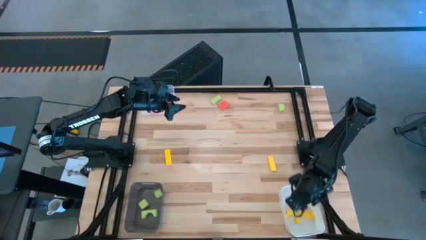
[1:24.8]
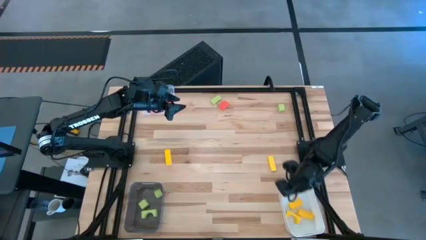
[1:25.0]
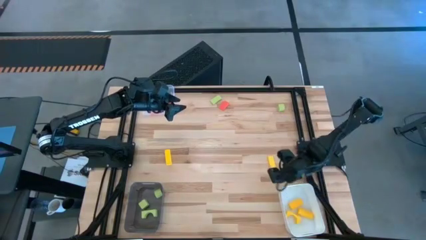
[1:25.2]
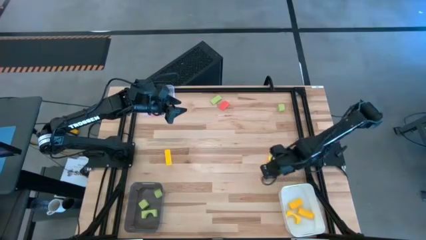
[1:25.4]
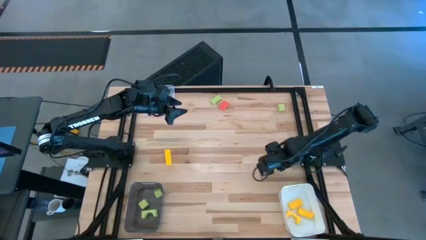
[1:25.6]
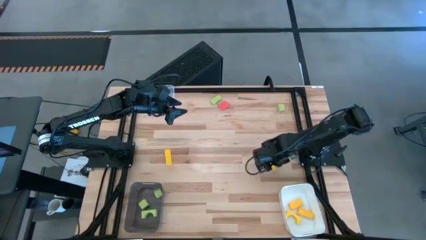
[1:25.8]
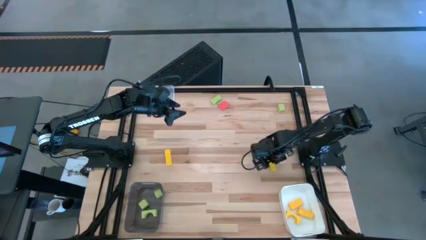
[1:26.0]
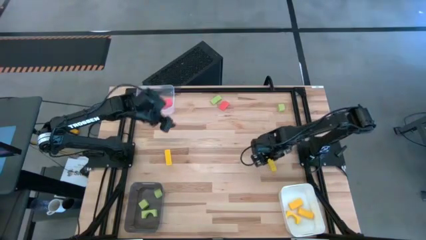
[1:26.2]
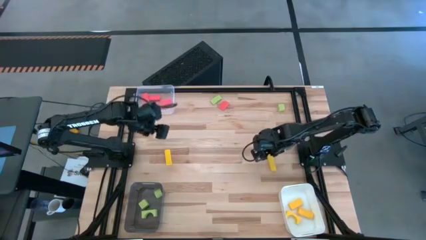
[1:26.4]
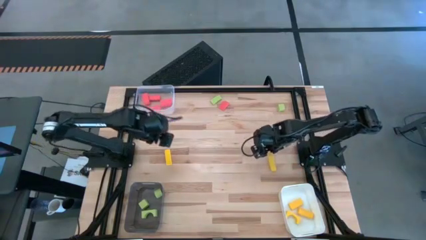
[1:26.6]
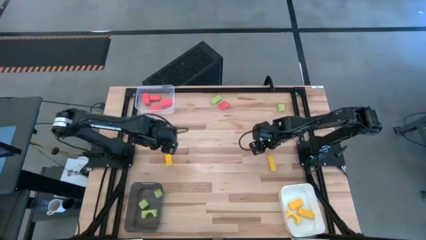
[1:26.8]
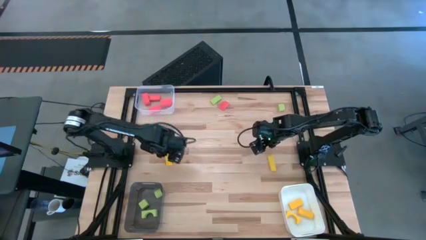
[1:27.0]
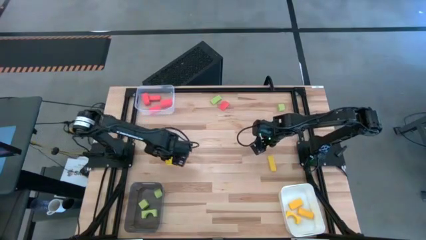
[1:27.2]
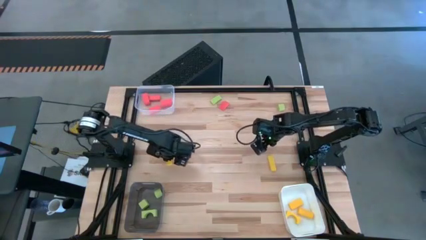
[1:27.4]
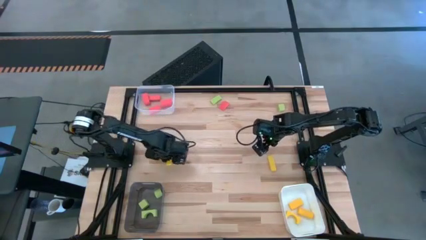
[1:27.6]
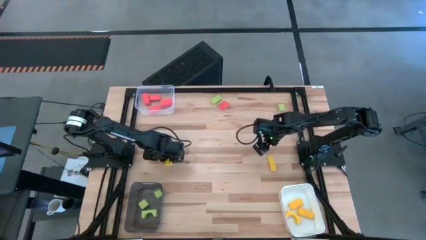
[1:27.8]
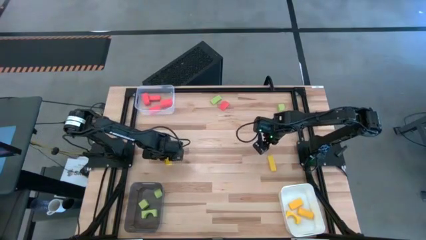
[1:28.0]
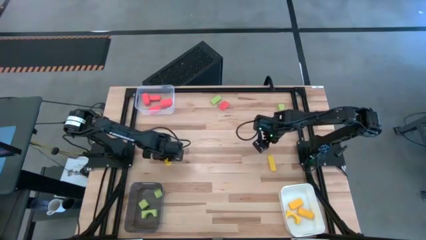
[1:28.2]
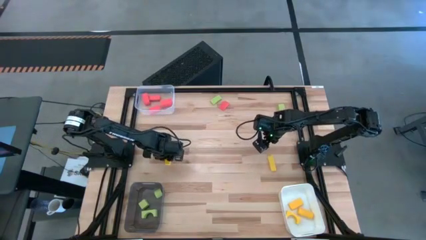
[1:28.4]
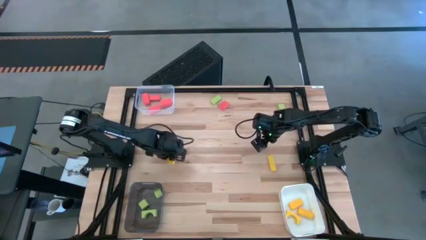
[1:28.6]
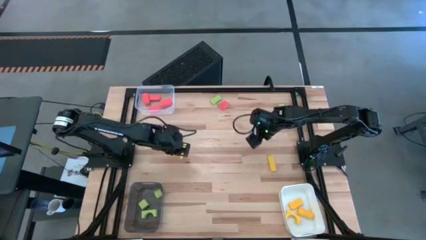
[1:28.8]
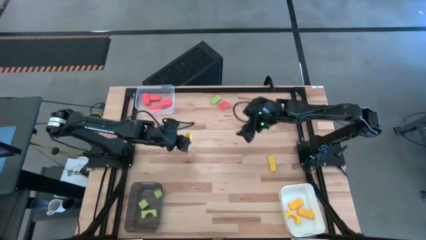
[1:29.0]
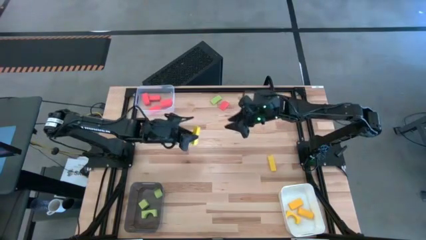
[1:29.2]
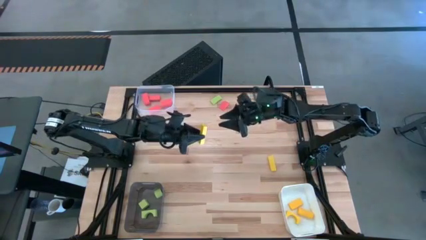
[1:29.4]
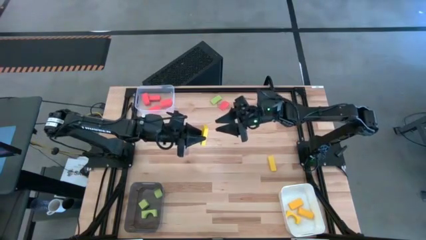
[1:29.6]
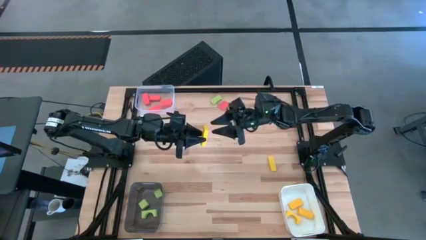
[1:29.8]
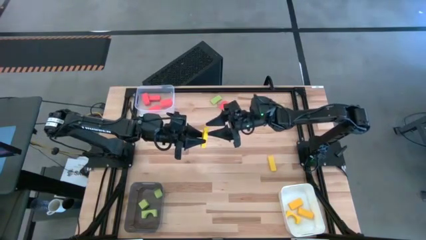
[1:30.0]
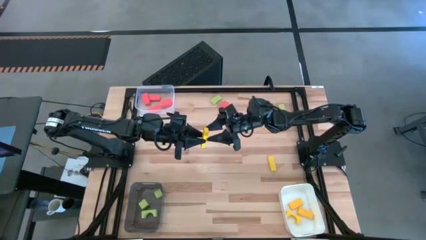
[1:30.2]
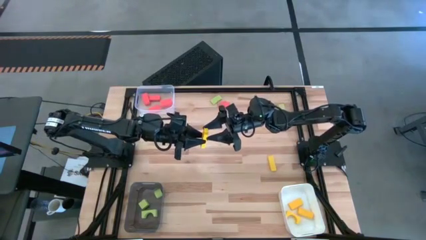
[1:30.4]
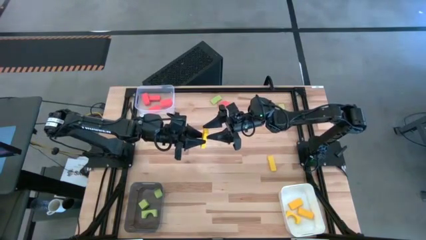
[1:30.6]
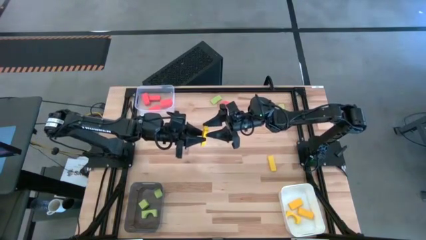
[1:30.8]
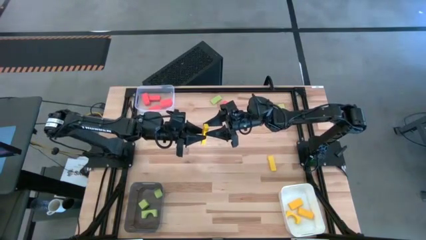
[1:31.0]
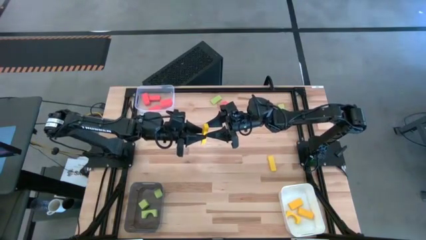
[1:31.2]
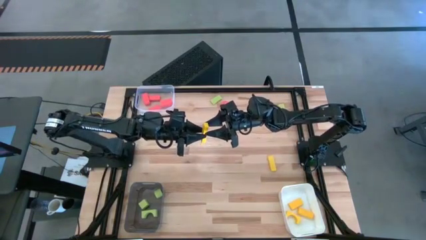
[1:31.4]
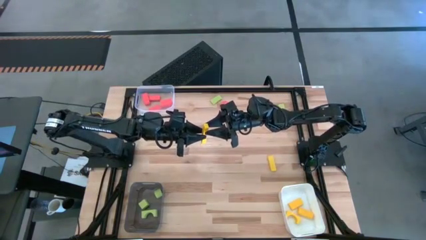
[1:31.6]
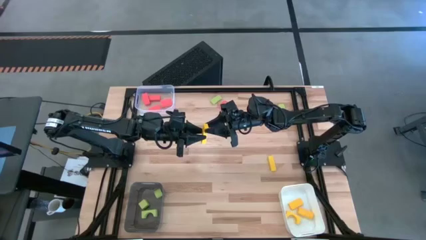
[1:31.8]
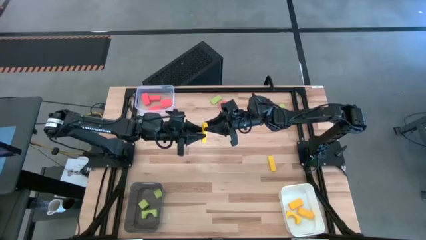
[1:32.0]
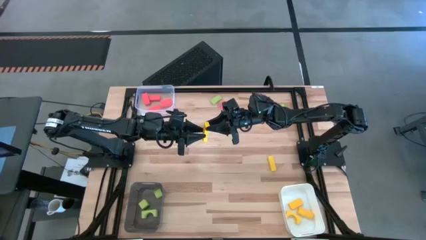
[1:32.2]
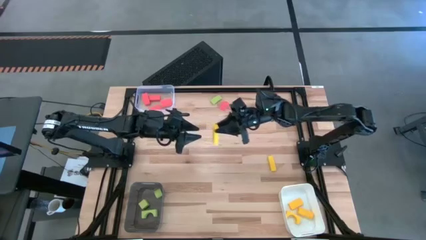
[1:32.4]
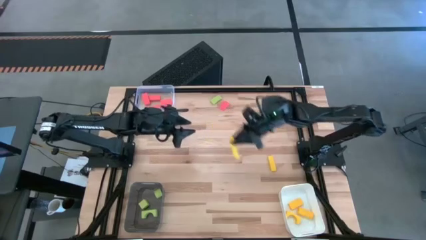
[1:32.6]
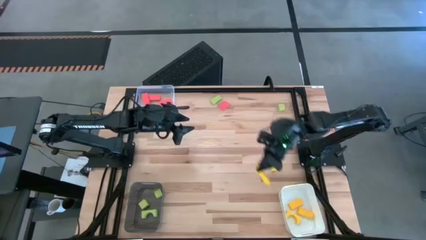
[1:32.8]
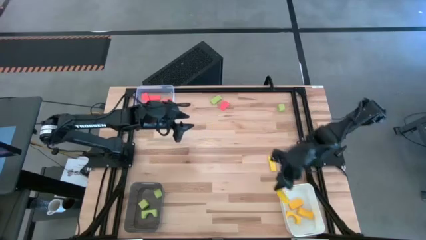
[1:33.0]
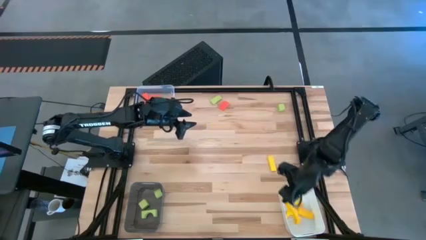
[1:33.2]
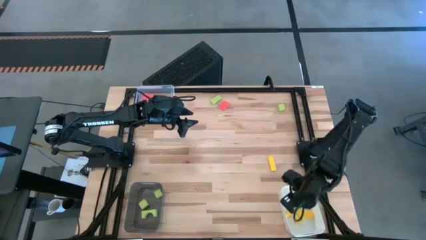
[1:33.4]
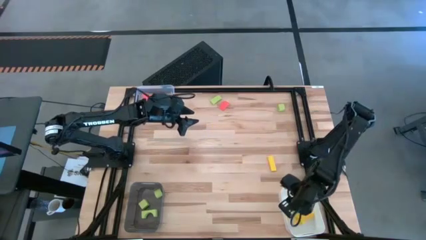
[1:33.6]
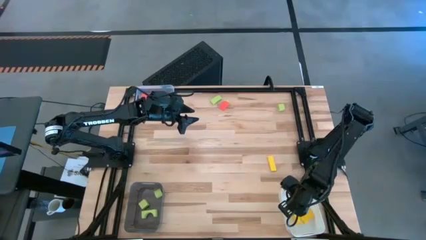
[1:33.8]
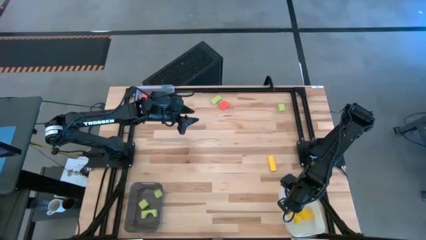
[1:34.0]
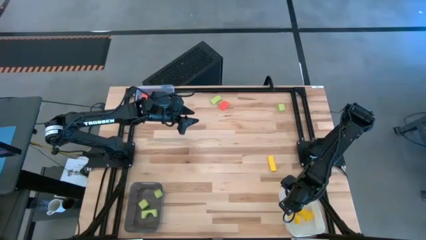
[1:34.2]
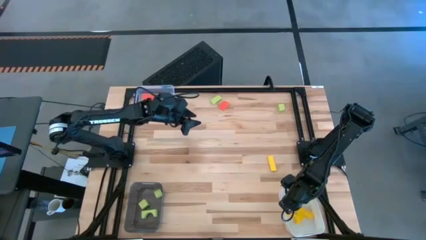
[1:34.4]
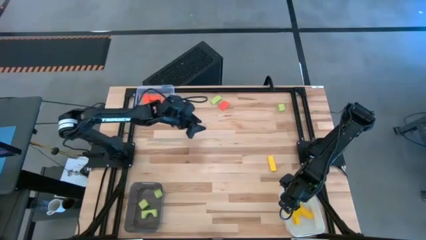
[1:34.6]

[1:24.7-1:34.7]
Task: Sort & place blocks by color
Put the yellow block into the white bin

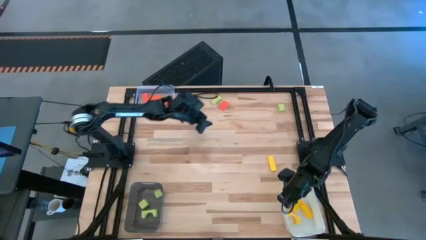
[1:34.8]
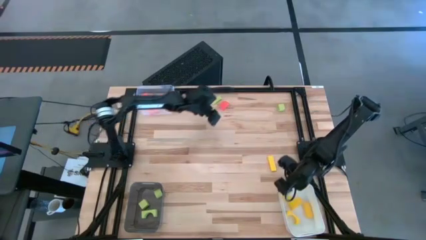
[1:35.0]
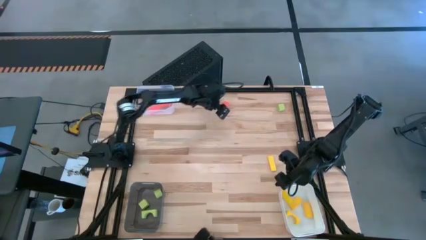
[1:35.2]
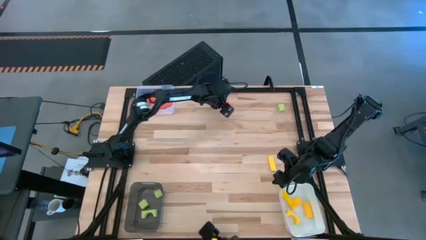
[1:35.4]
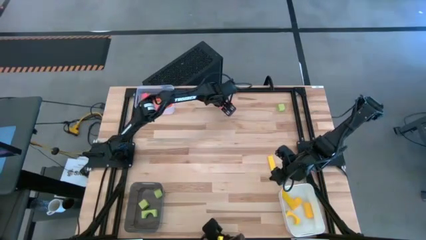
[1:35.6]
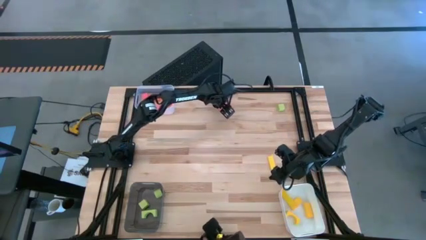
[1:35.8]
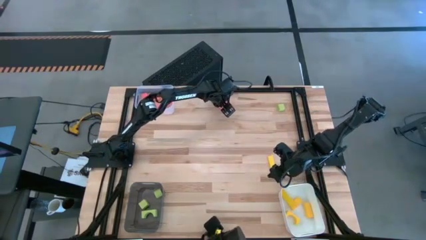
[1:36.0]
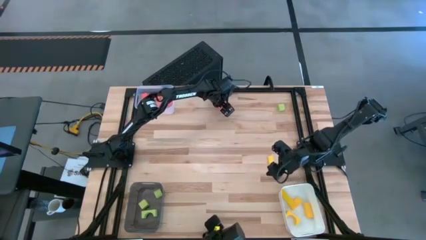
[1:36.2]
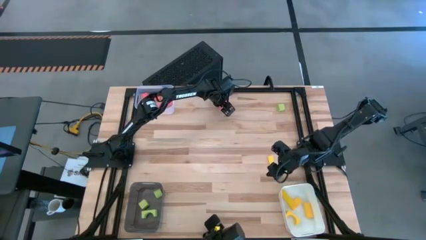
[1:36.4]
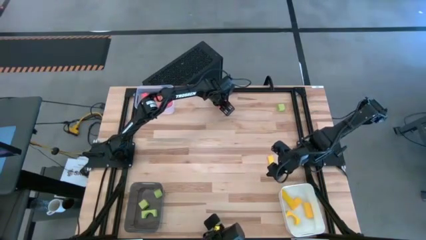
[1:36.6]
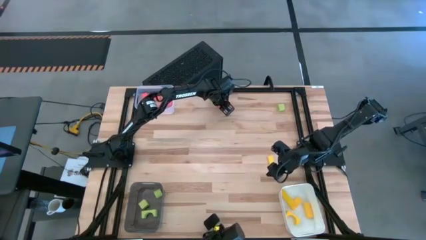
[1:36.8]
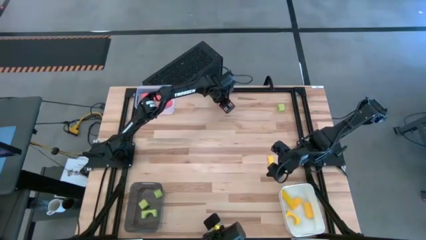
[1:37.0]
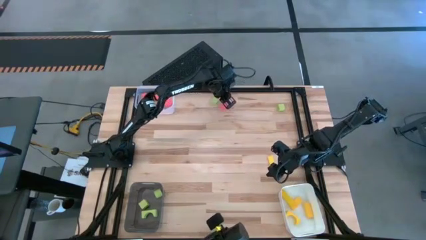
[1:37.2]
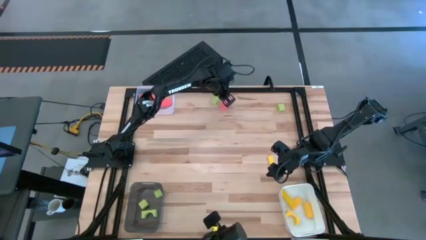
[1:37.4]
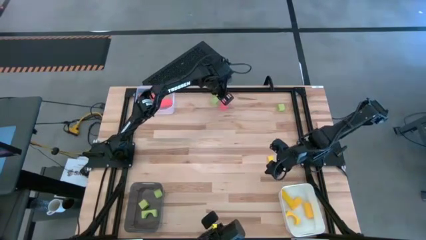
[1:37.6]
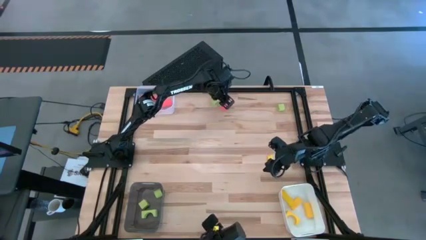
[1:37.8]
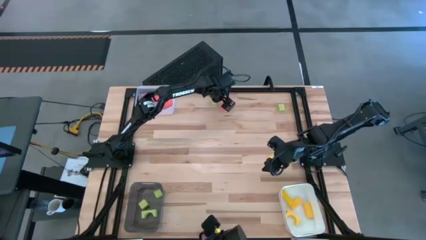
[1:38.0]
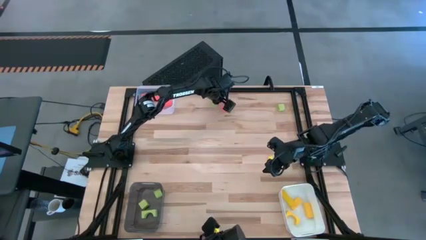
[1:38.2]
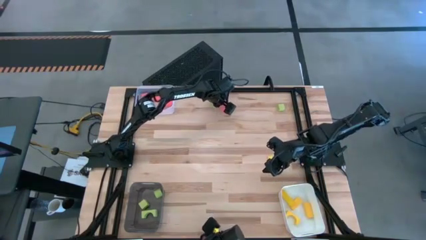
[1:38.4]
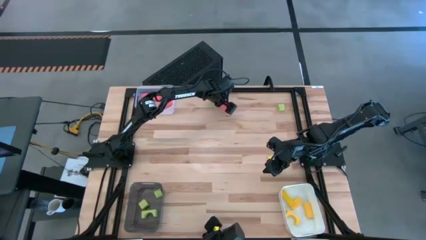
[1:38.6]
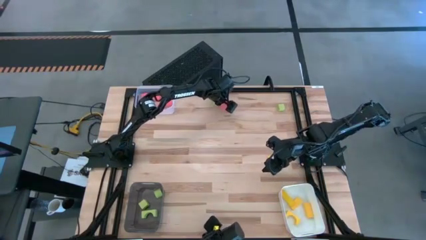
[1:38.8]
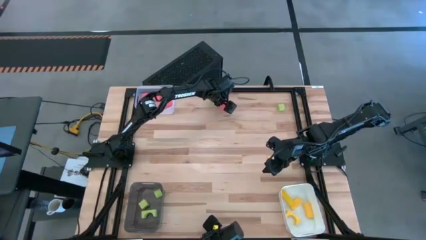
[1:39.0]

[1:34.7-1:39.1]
Put the orange block into the white transparent bin

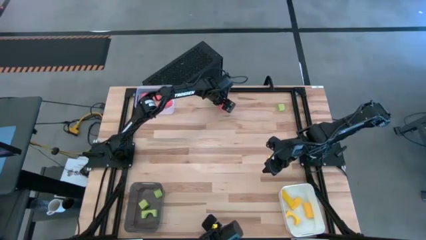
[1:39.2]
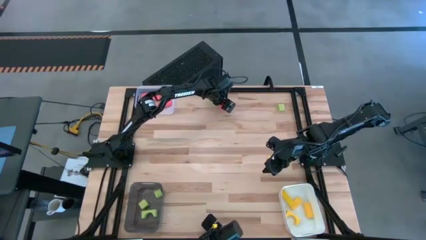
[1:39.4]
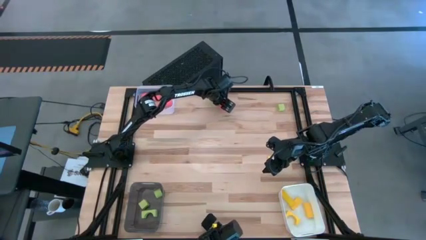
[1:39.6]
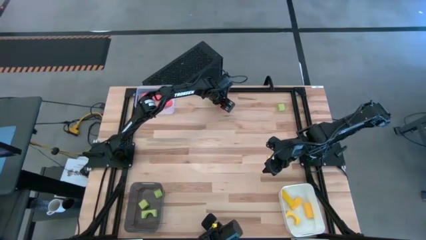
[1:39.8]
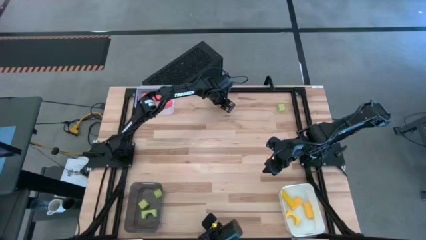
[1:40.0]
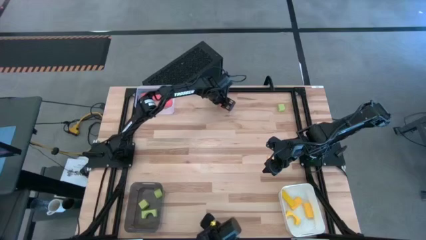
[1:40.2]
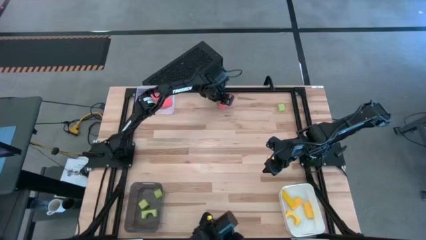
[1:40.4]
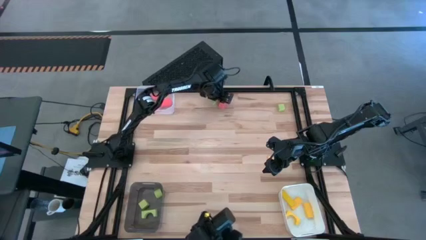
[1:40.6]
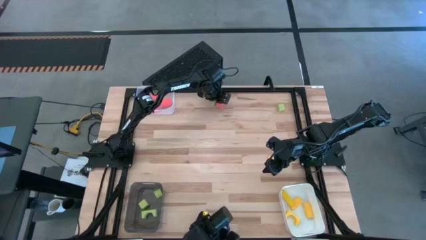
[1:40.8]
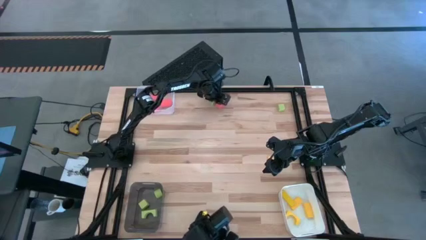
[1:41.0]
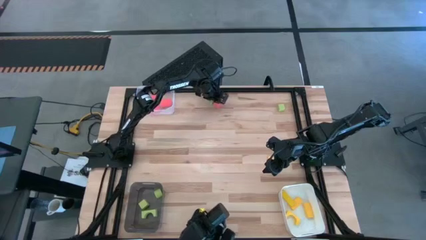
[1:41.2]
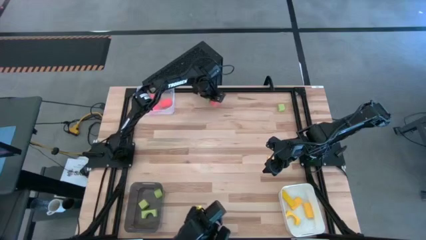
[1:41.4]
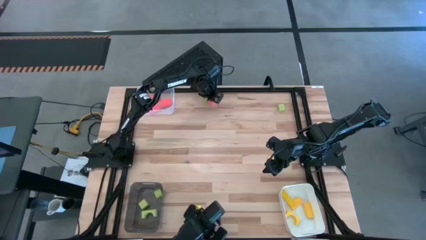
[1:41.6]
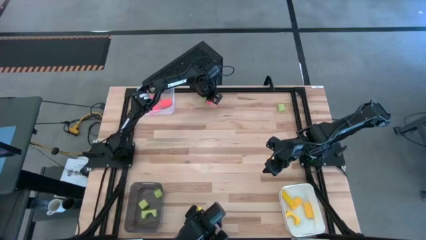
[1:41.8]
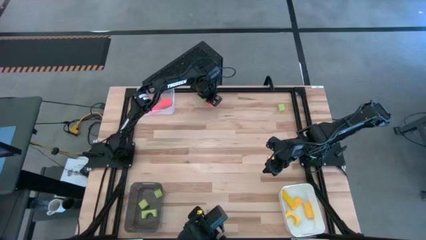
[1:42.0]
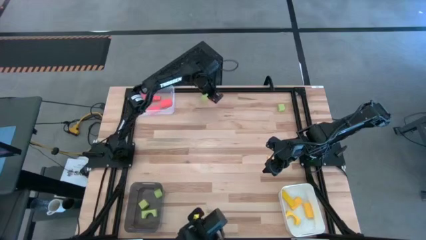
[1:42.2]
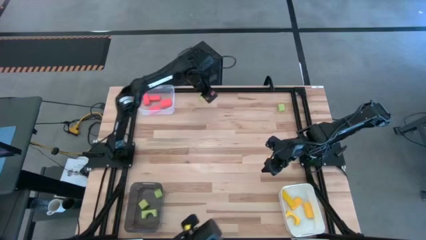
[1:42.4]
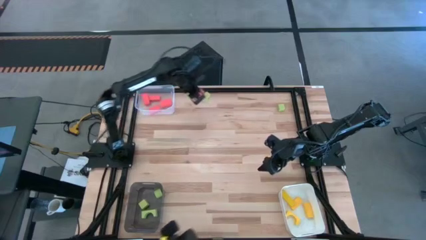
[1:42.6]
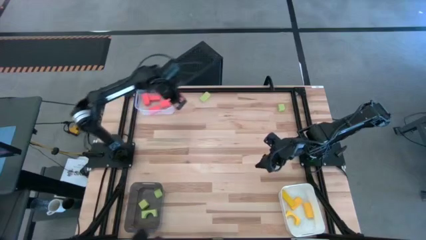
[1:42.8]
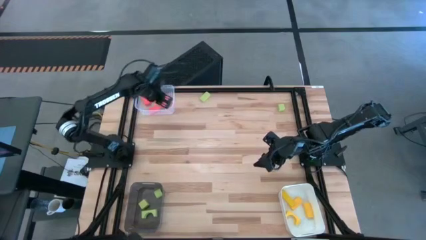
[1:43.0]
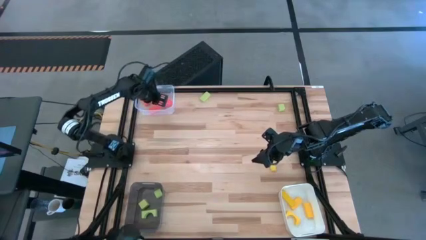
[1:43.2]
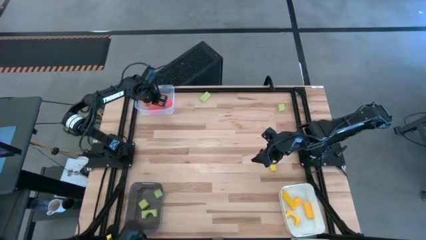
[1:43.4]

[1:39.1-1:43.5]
Put the orange block into the white transparent bin
